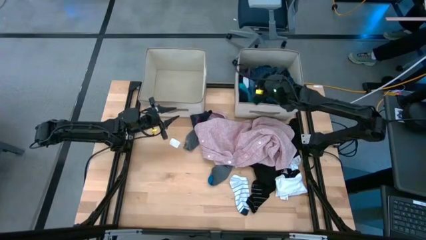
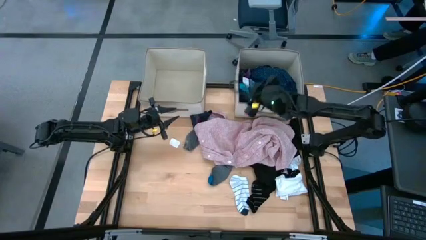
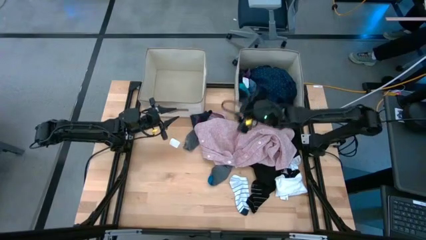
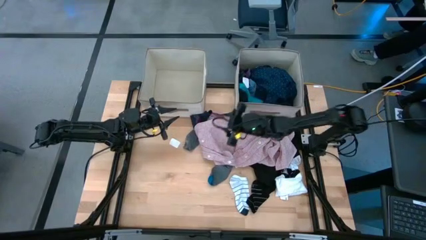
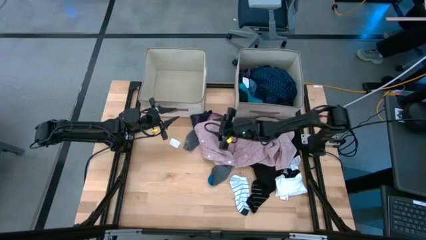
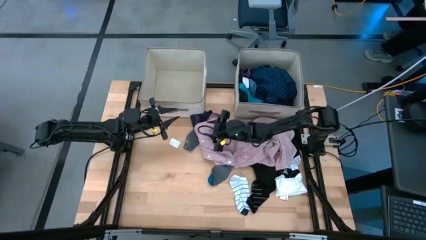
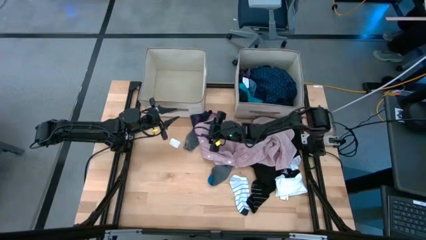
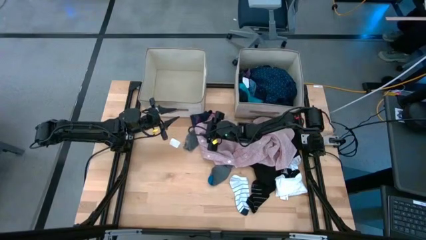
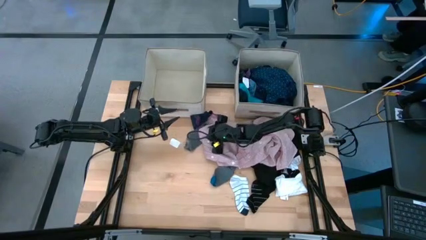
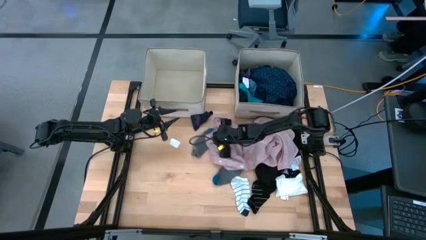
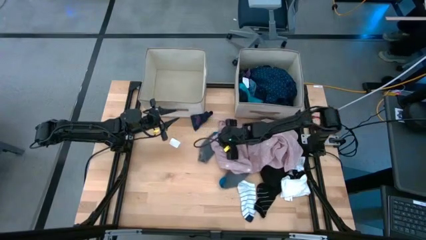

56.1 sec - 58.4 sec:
Task: Sort clothes
Put the blue sock into the right laundry organizer

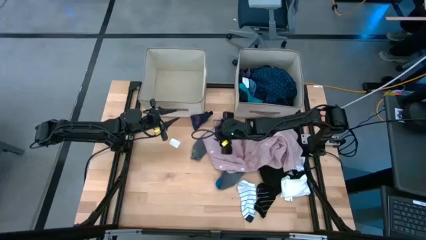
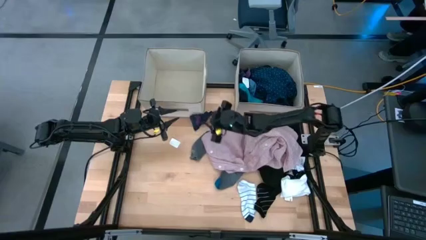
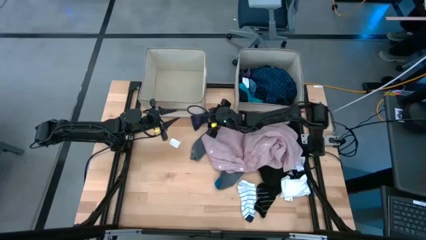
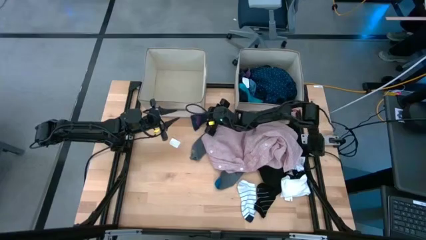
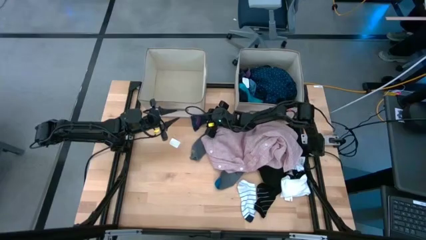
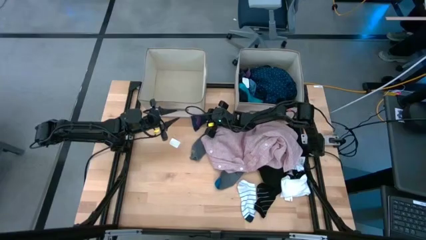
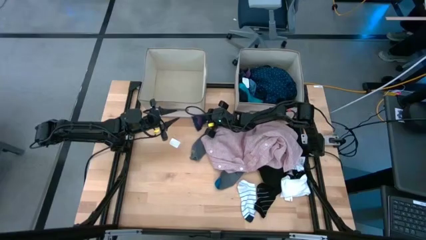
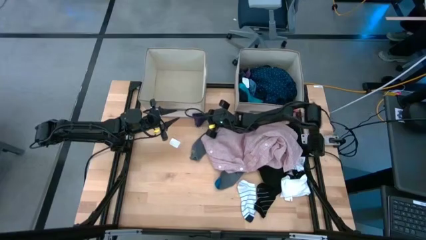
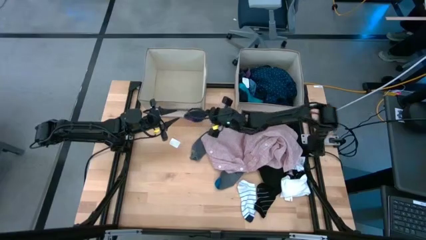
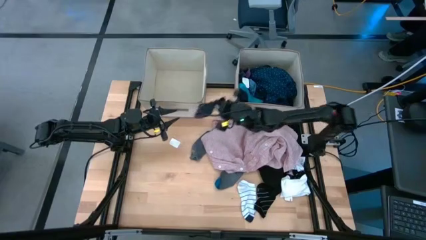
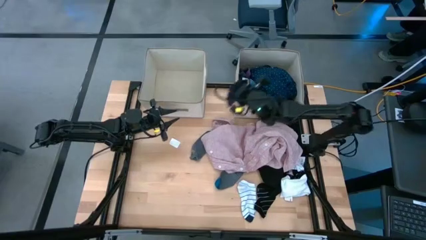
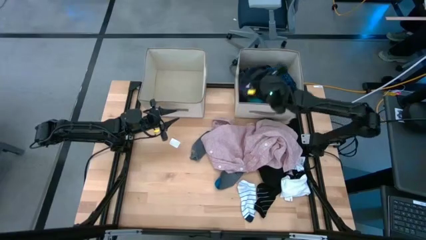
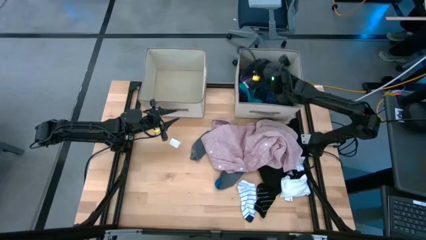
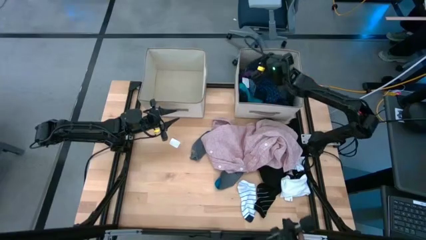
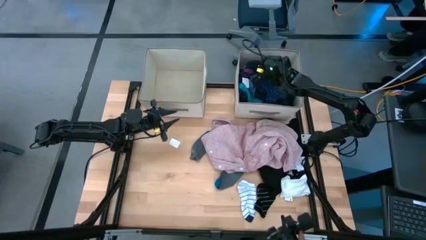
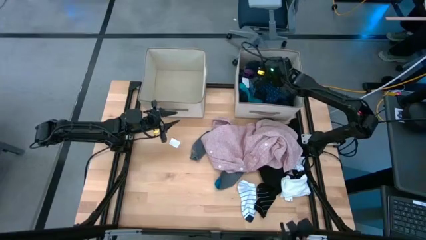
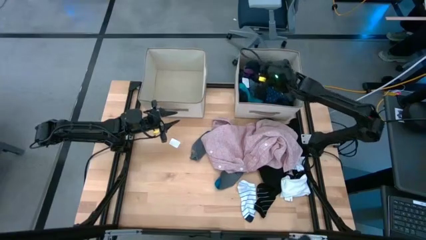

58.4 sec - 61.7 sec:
Put the blue sock into the right laundry organizer

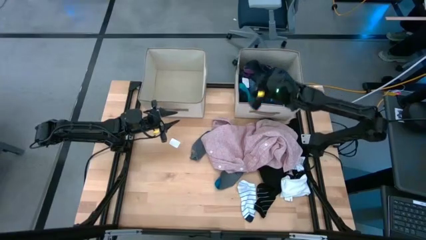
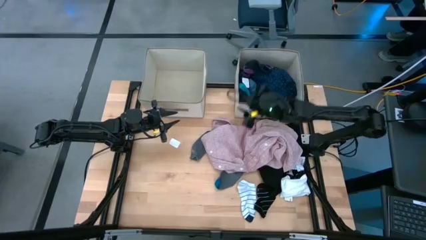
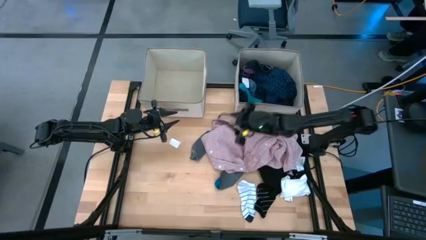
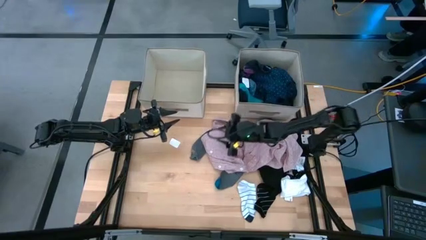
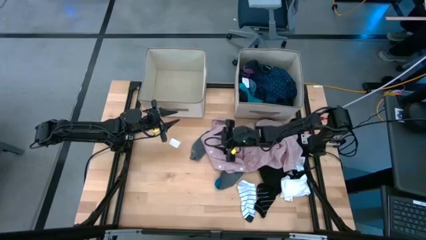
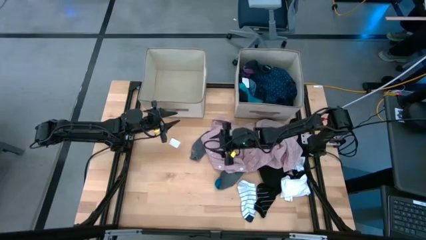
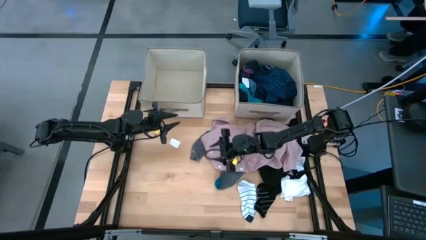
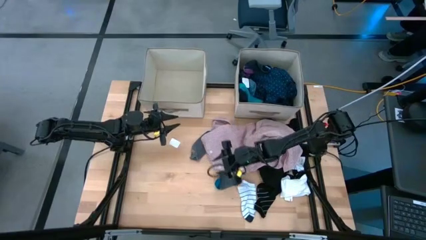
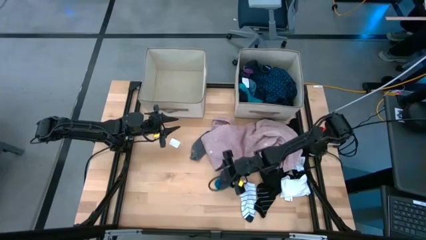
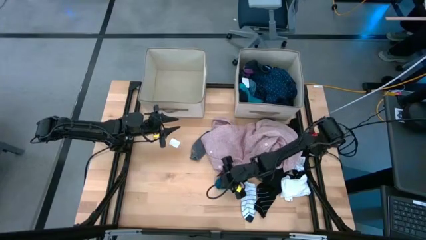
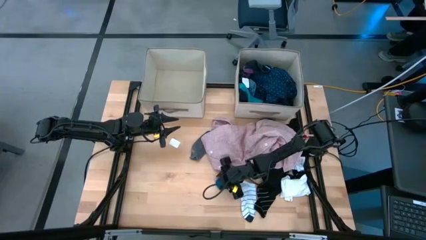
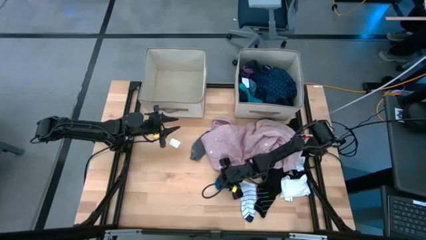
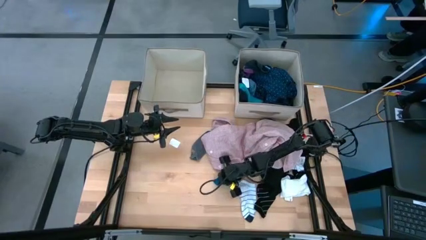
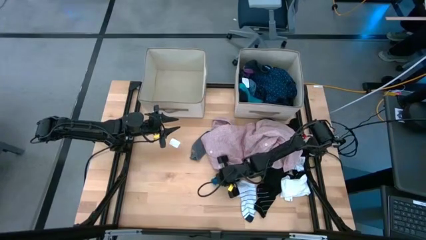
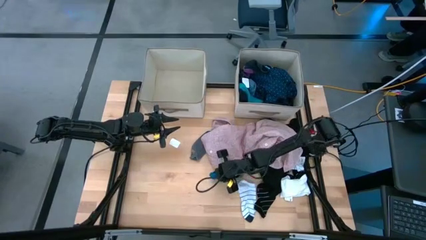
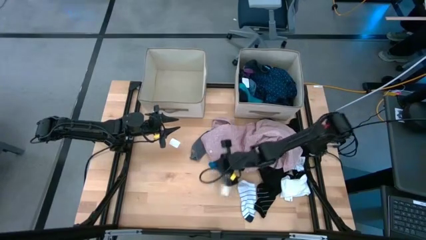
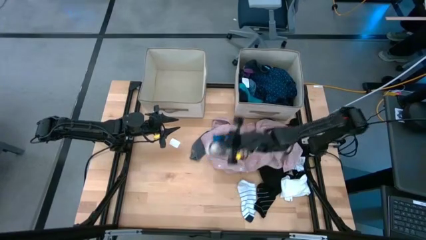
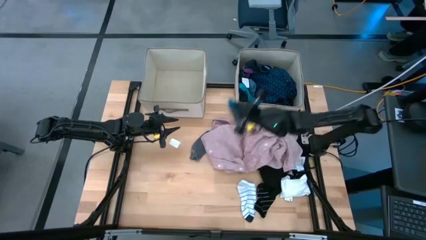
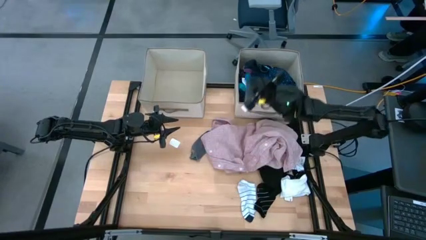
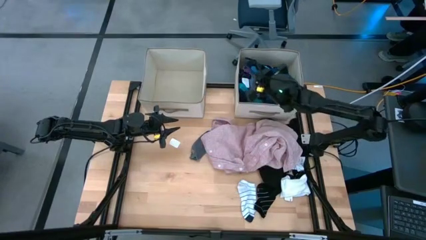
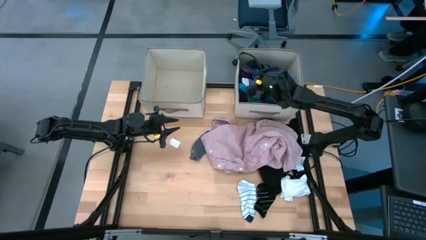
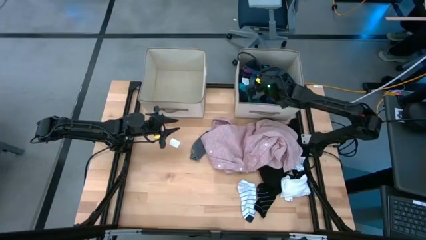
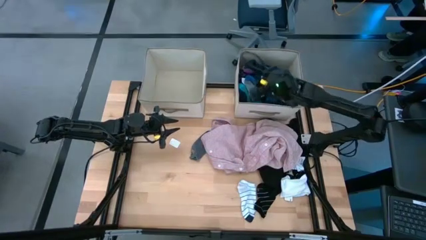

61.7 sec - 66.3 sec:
Put the bottom gray sock into the right laundry organizer

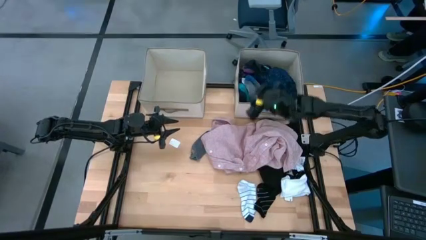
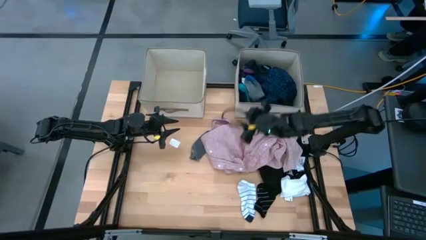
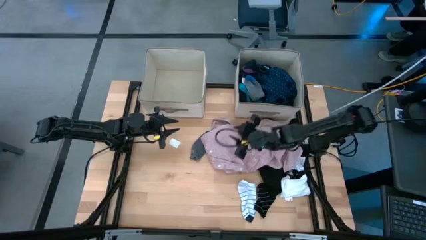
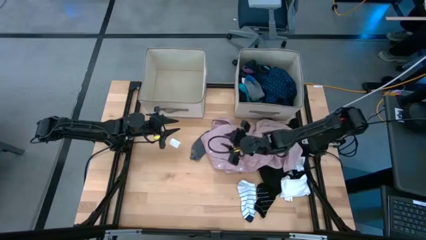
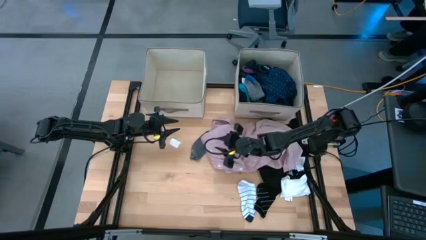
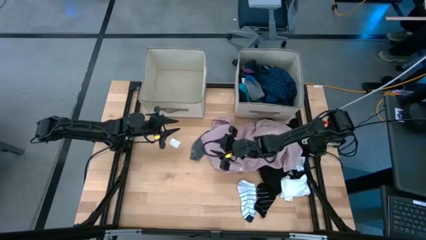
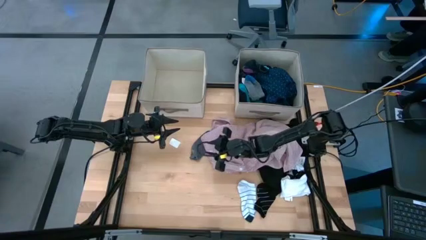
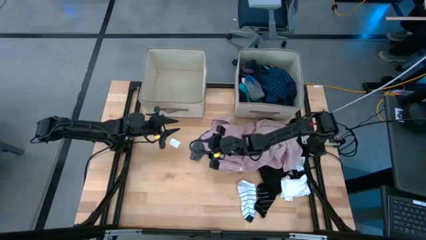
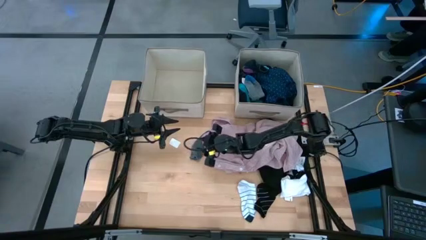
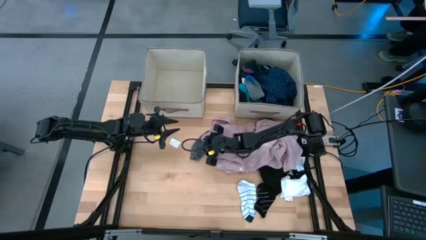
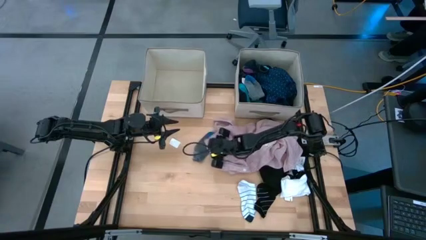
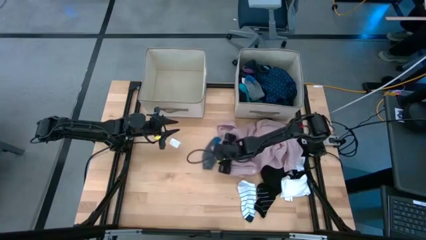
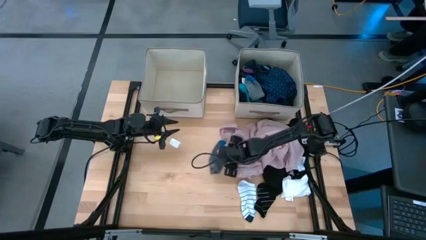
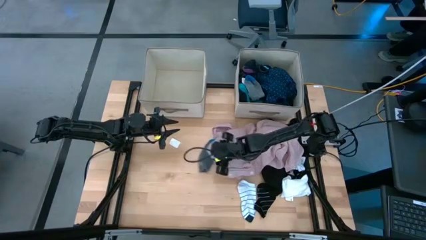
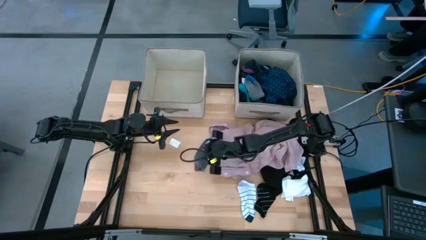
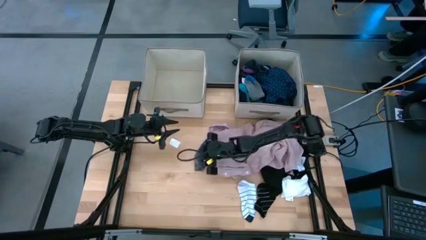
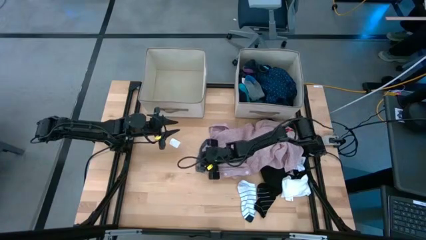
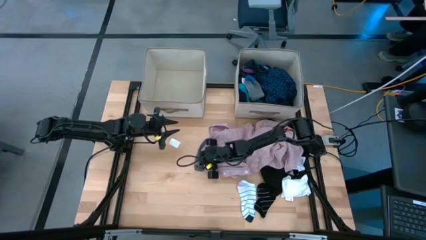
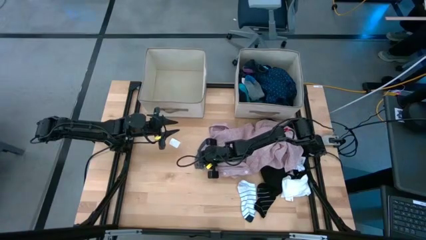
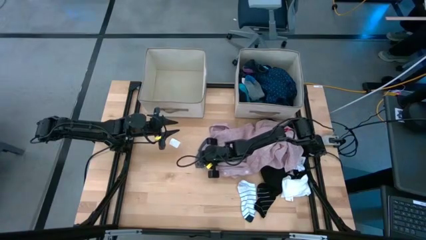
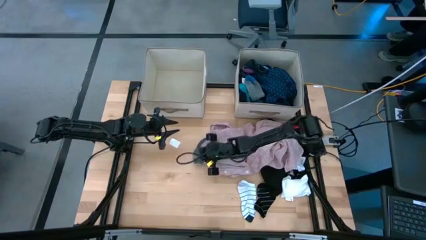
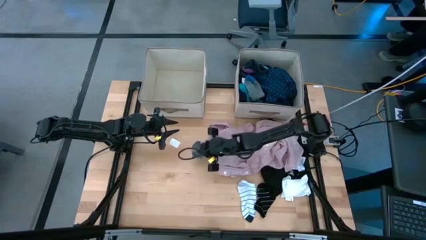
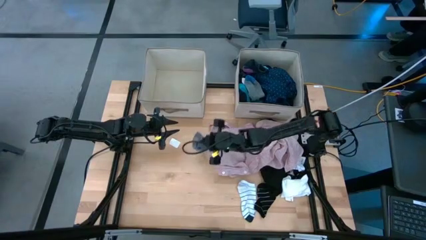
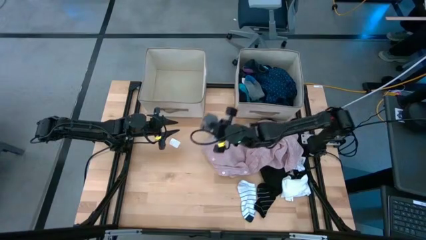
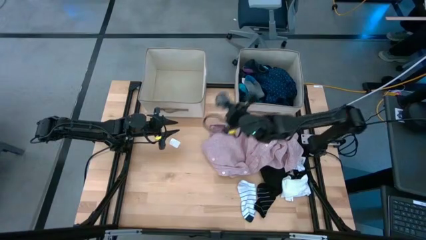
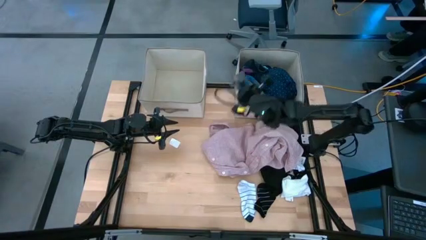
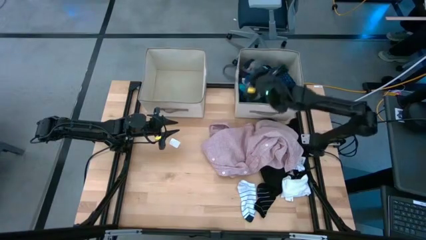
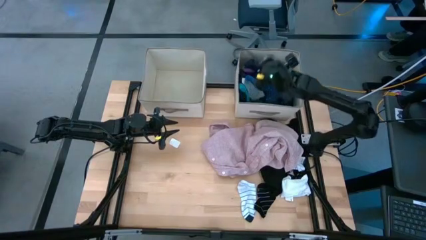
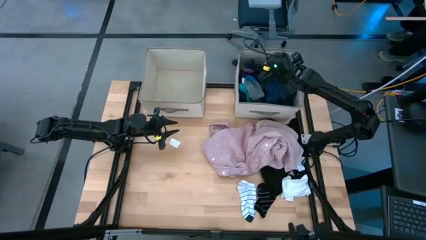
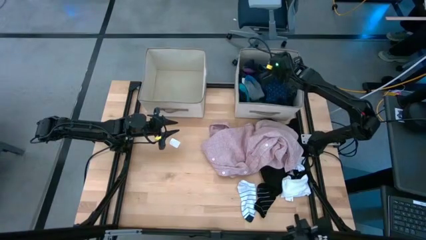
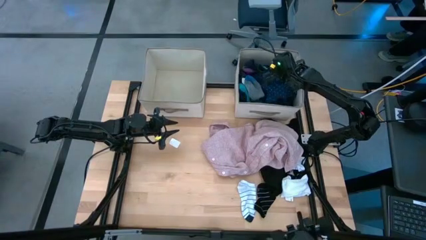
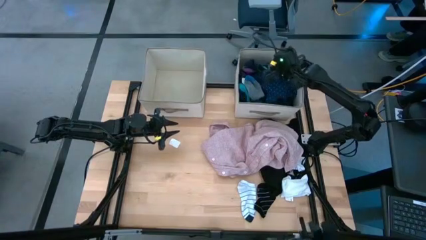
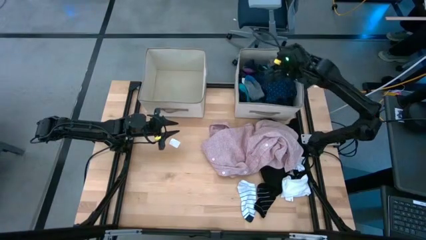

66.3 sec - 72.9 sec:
Put the gray sock into the right laundry organizer
